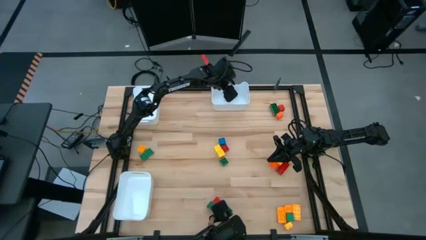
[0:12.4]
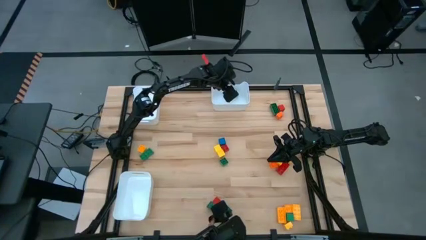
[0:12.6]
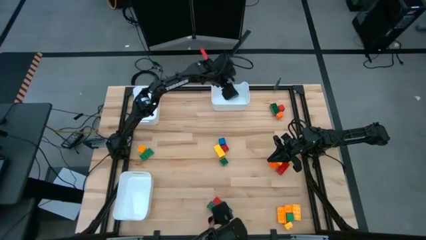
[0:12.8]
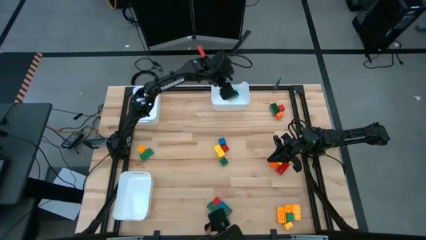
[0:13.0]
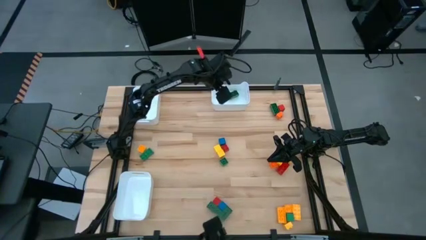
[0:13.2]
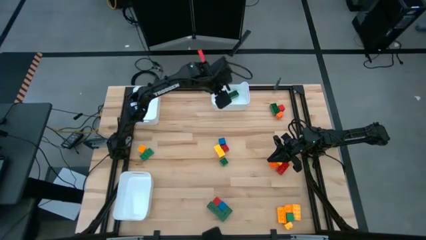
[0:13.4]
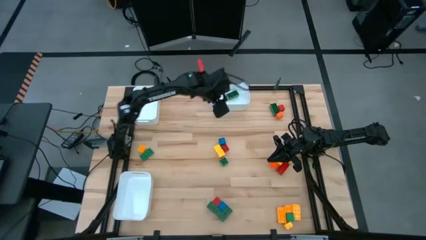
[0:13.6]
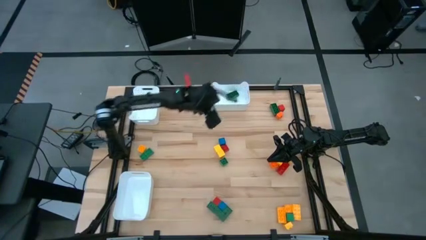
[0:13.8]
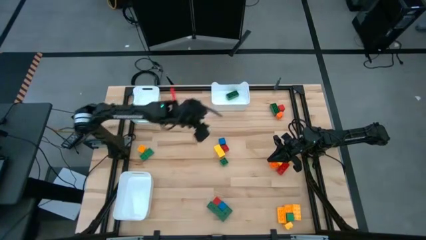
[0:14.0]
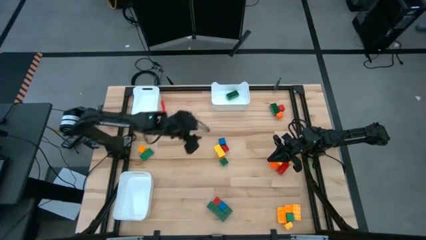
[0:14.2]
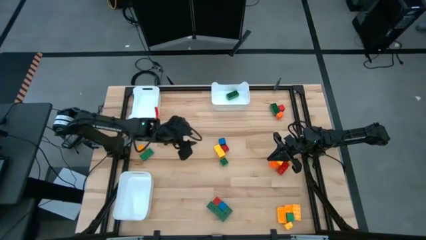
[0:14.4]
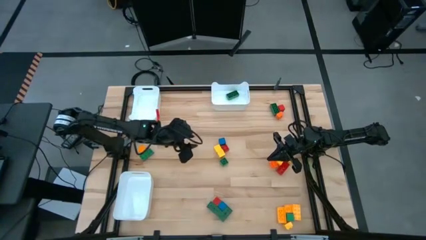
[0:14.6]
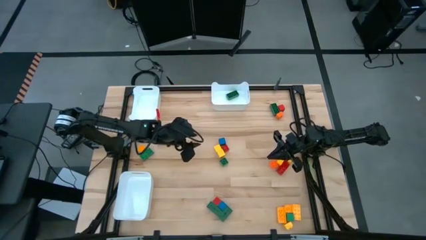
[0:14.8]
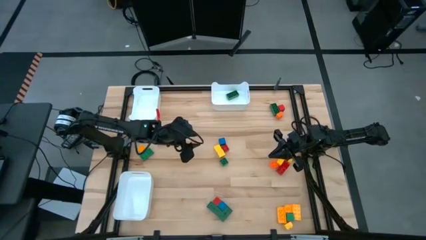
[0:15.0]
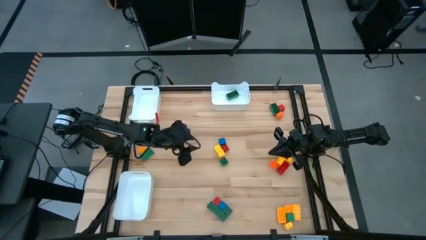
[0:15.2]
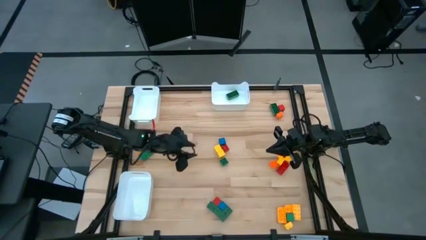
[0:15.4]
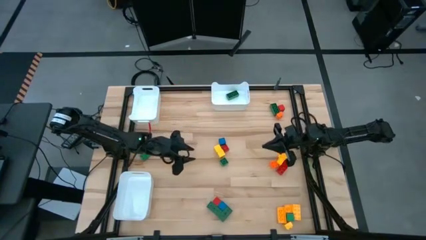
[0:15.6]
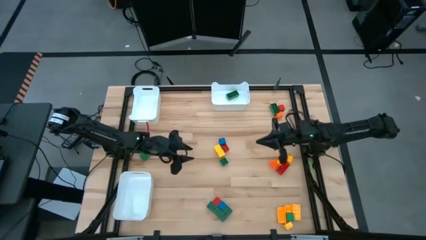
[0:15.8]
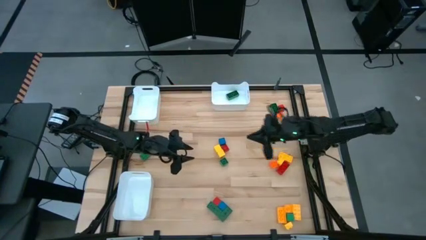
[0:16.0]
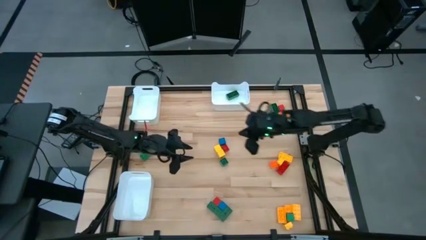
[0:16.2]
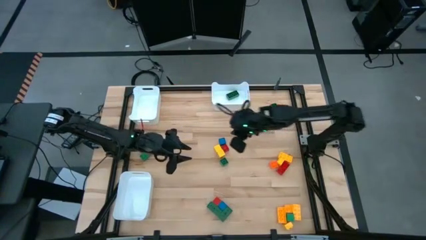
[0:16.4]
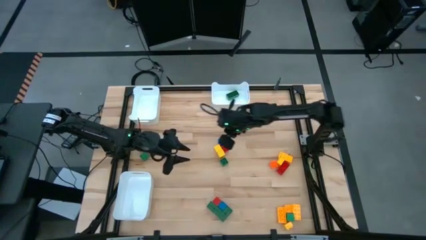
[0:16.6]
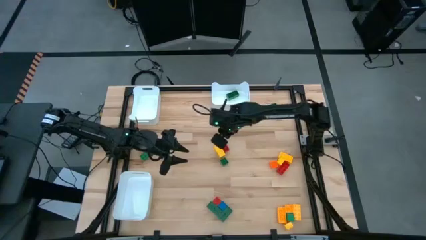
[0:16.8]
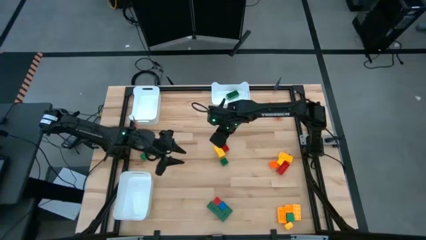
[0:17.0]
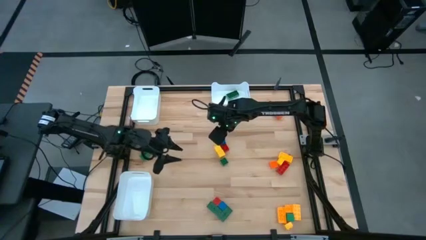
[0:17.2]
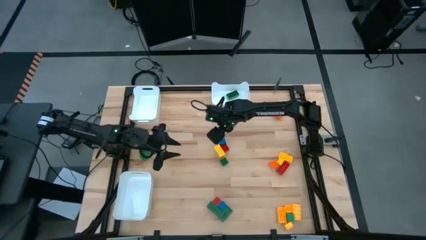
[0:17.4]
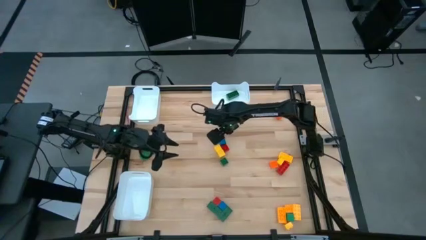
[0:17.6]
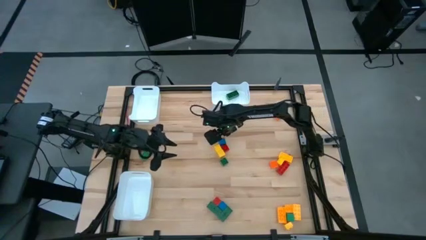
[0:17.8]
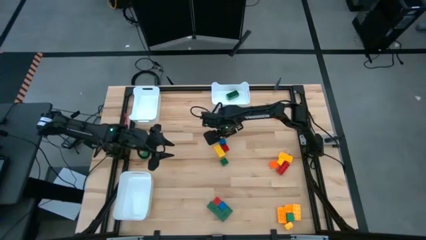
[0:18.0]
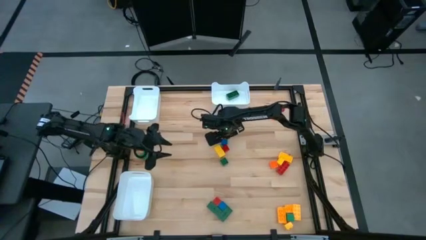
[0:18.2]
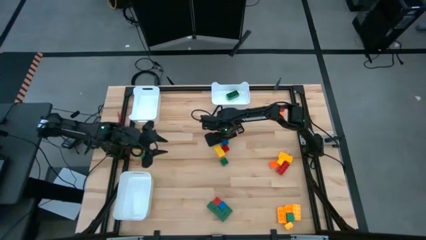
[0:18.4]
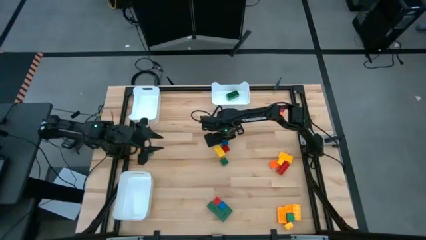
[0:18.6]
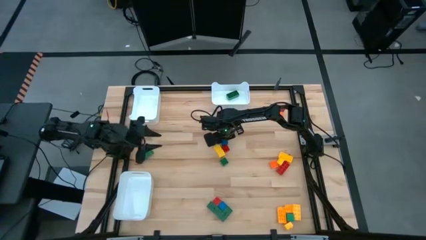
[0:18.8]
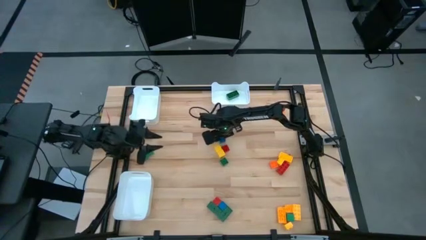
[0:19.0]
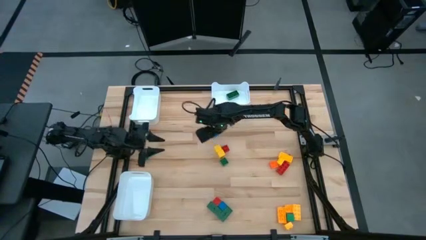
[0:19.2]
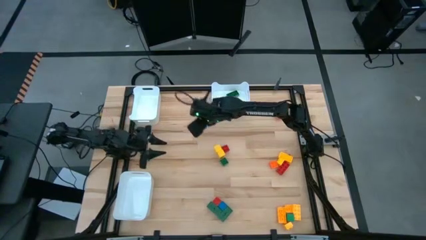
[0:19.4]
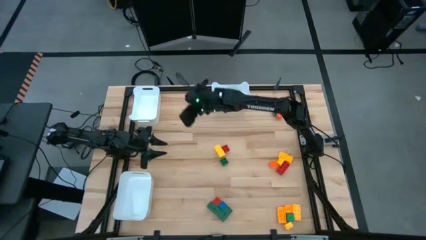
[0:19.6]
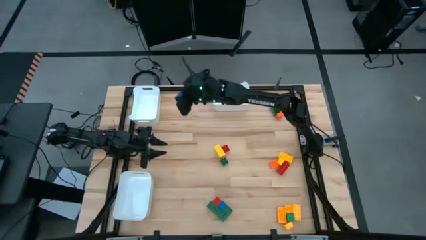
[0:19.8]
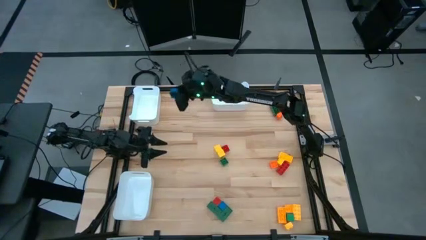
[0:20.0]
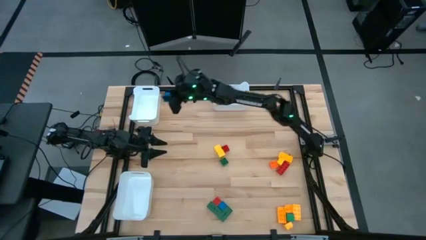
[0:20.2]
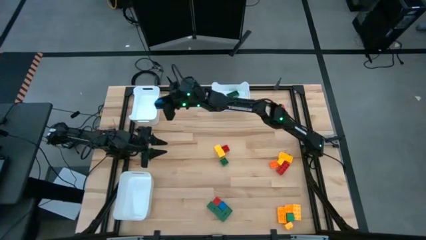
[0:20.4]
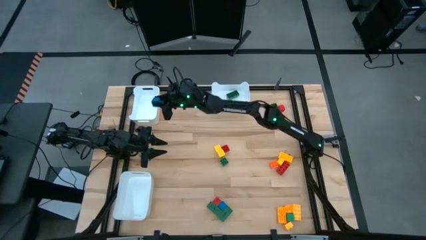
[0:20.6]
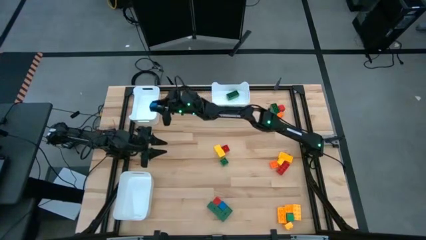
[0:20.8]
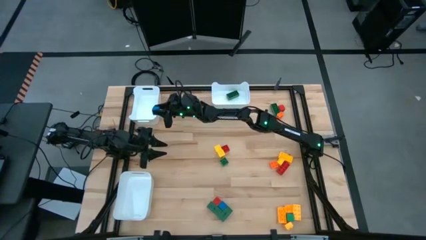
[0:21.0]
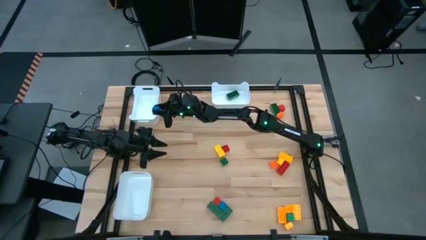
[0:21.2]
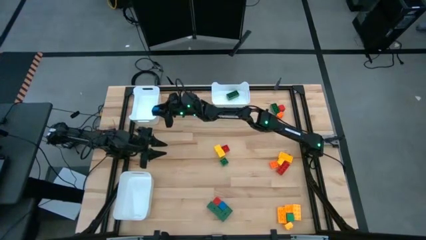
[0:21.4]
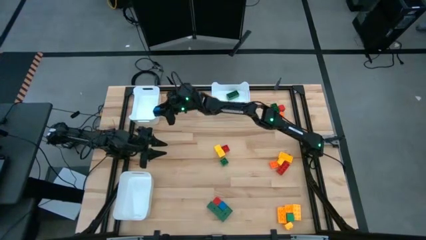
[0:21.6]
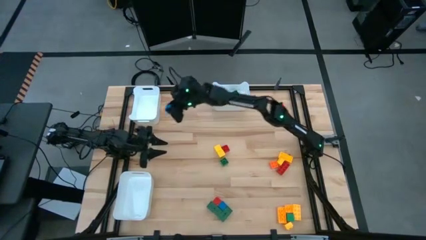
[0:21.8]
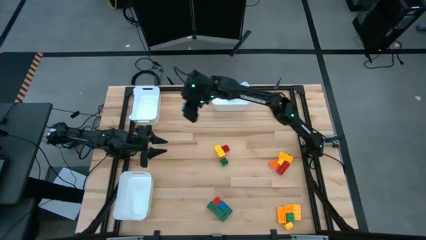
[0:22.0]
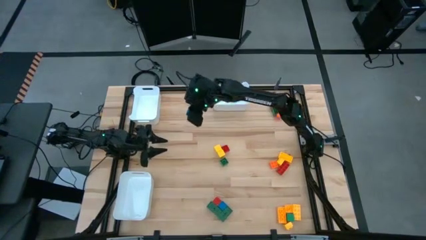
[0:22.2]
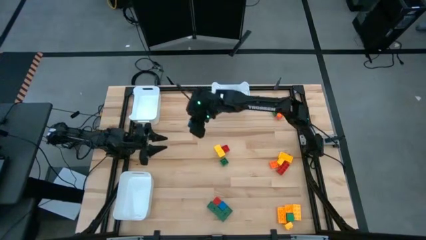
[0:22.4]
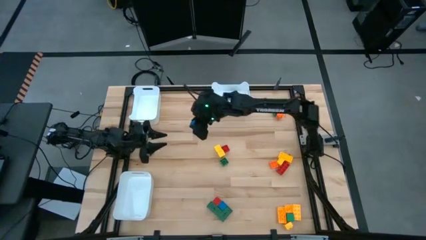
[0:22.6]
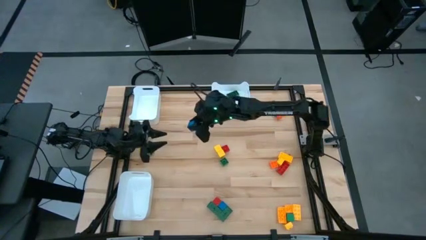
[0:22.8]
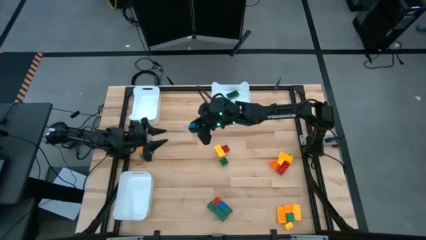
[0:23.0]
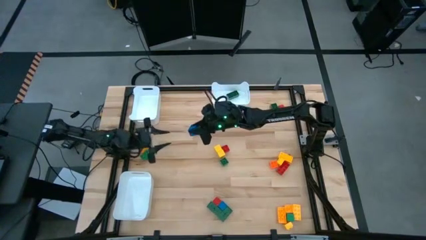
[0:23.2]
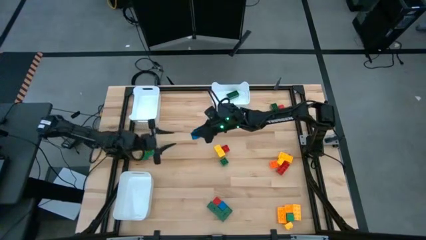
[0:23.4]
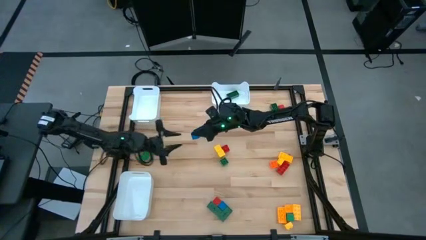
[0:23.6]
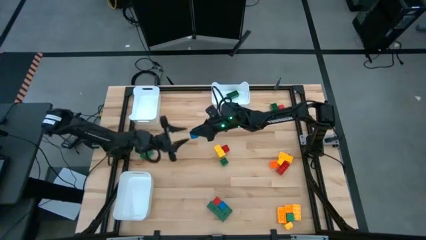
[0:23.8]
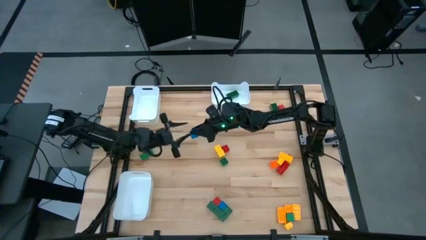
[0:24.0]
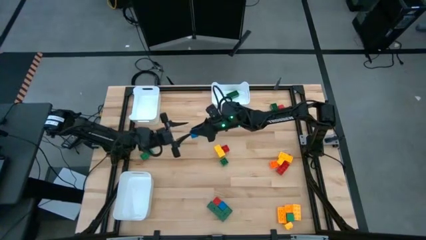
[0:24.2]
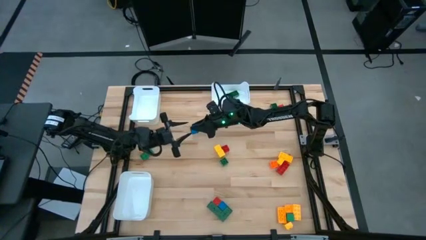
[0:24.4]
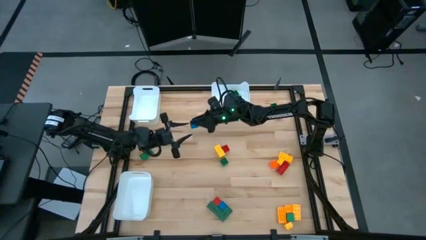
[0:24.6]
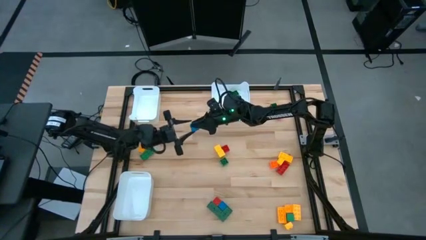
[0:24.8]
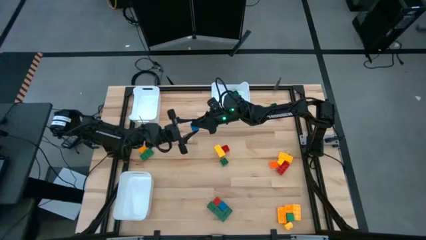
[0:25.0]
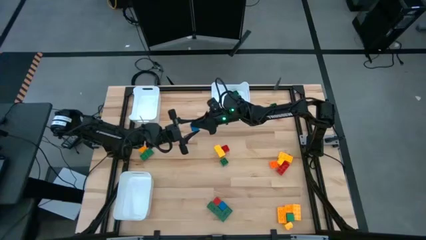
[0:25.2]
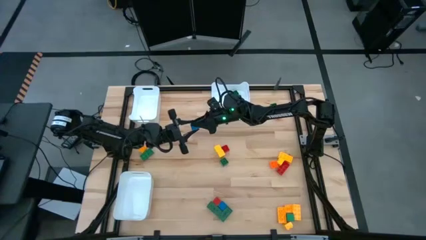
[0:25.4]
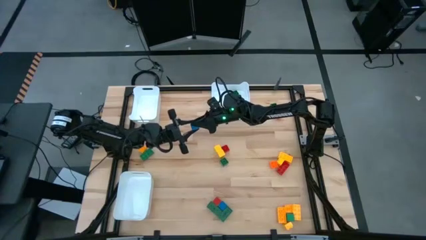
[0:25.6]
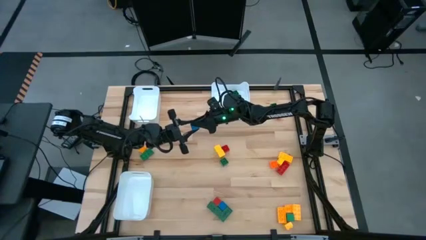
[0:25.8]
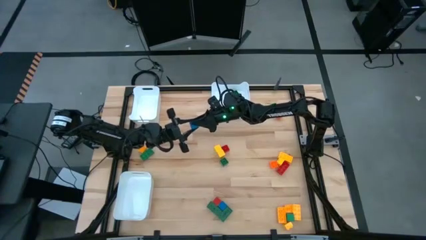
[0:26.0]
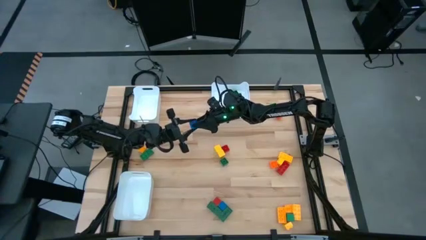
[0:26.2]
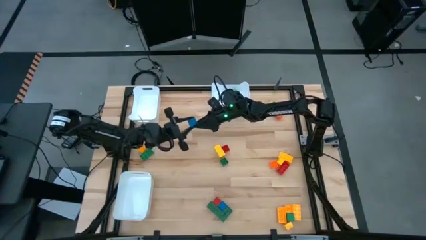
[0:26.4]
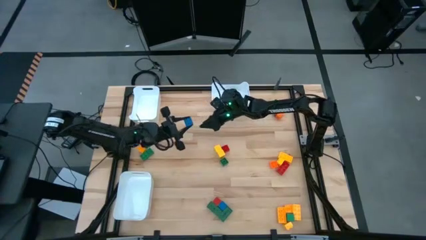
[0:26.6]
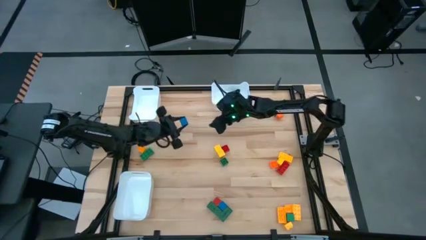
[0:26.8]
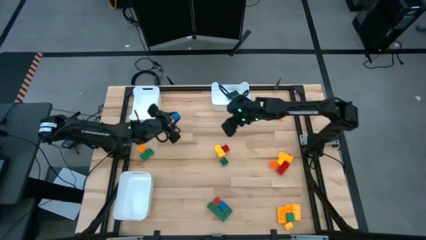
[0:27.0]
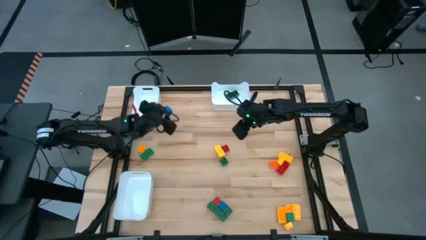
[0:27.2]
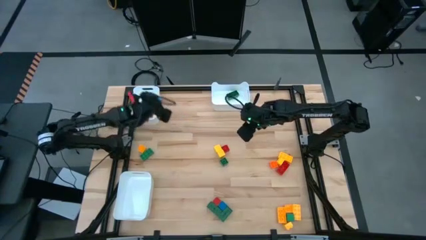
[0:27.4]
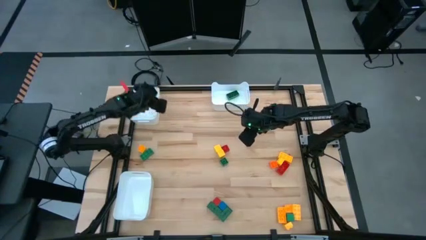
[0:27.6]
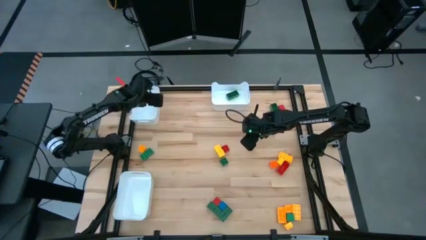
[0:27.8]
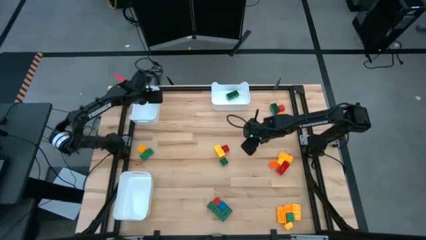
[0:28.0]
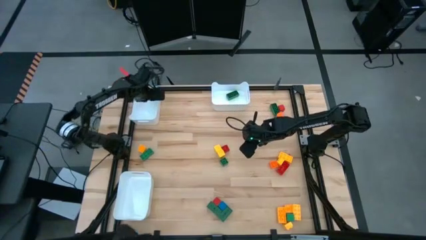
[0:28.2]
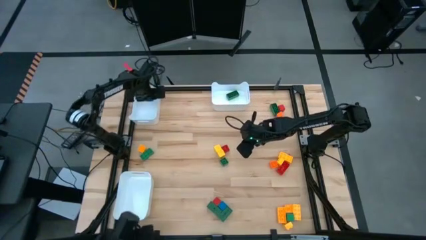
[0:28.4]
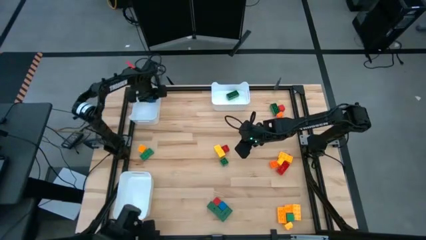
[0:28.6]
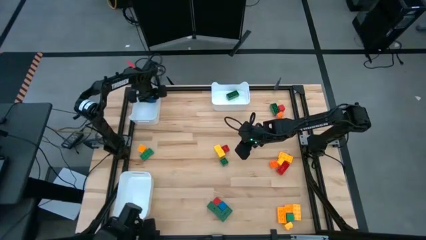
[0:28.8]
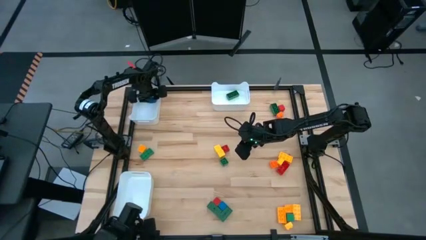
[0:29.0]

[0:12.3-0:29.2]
Task: Sort blocks by size
Put the blue block into the top left white bin
